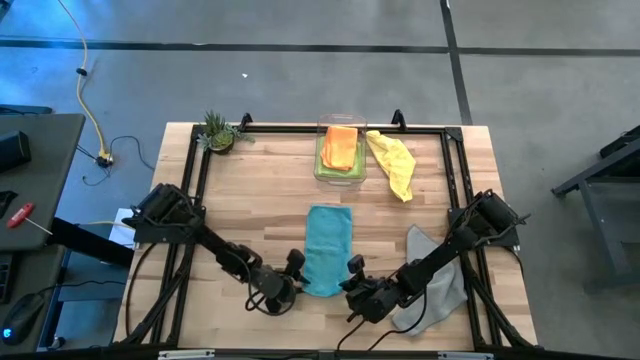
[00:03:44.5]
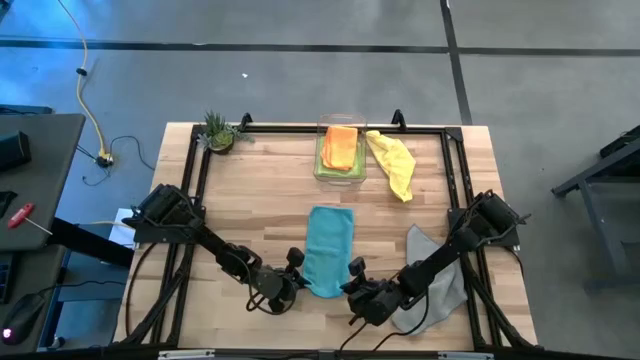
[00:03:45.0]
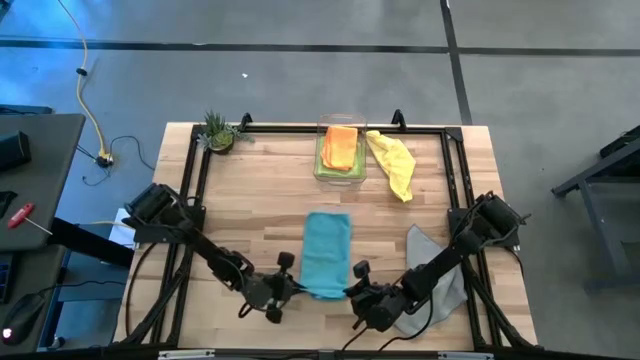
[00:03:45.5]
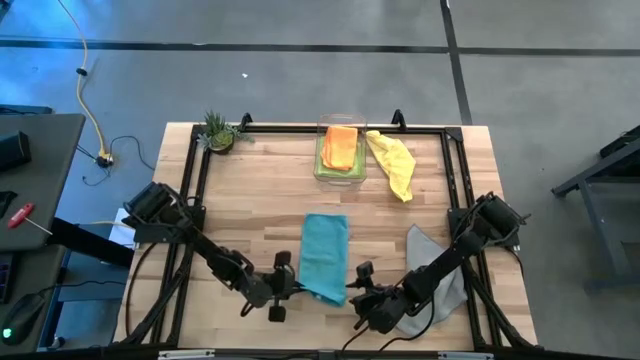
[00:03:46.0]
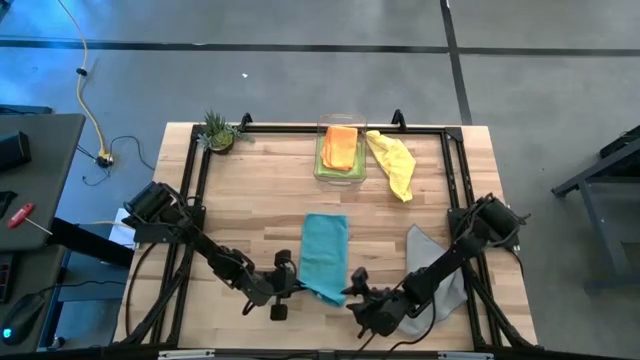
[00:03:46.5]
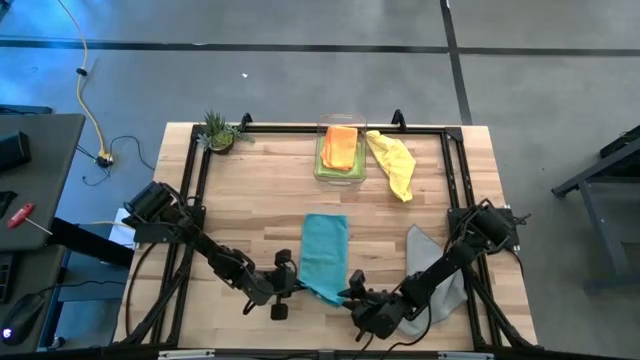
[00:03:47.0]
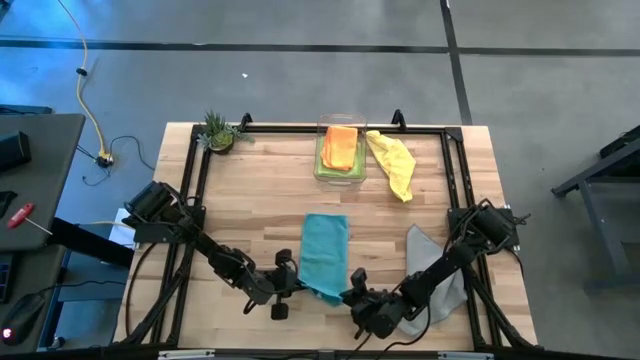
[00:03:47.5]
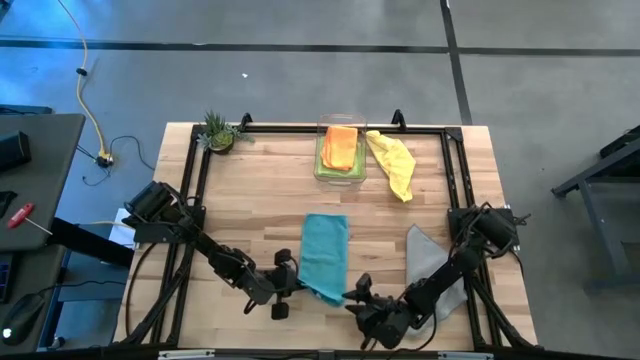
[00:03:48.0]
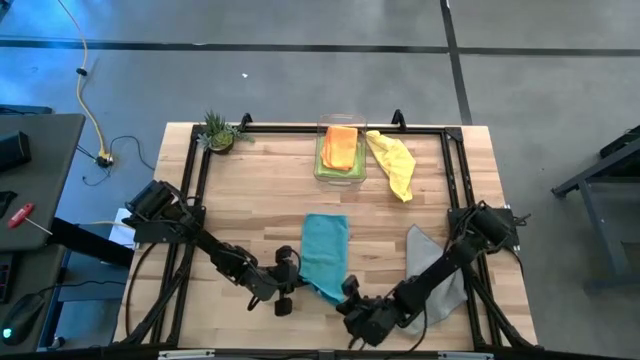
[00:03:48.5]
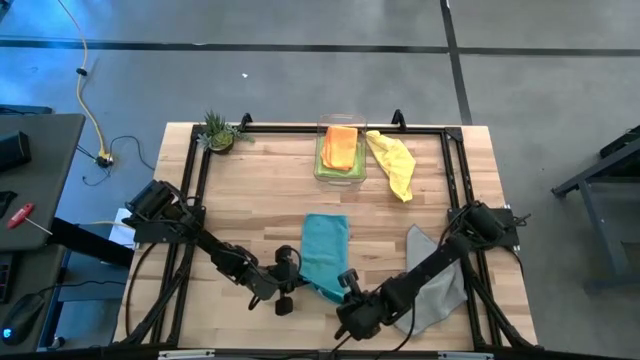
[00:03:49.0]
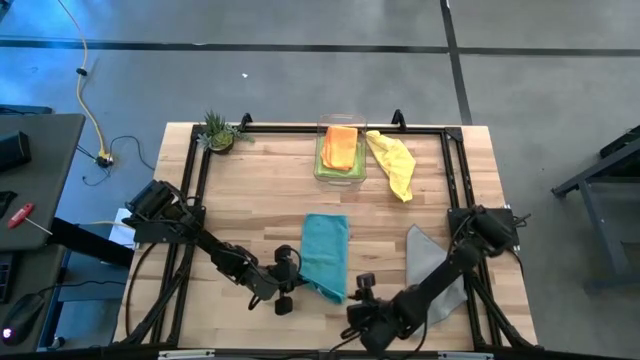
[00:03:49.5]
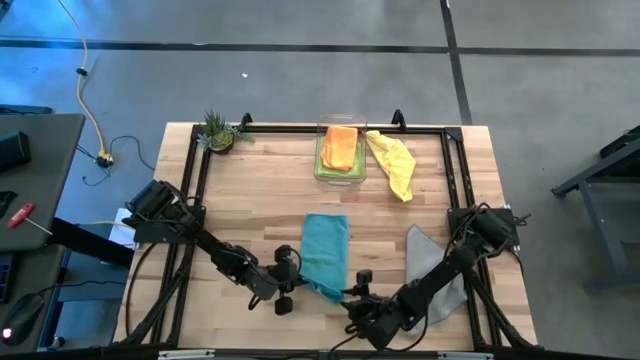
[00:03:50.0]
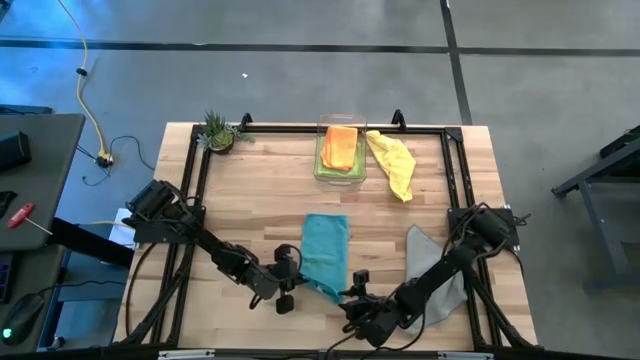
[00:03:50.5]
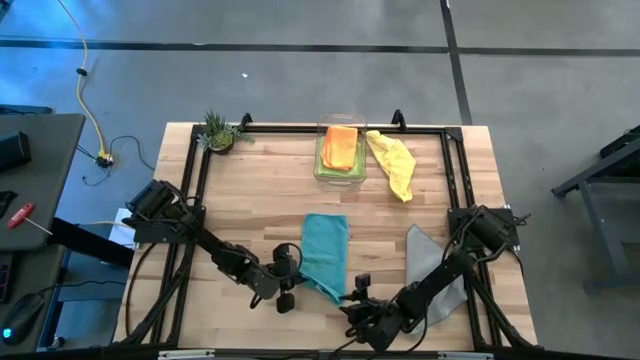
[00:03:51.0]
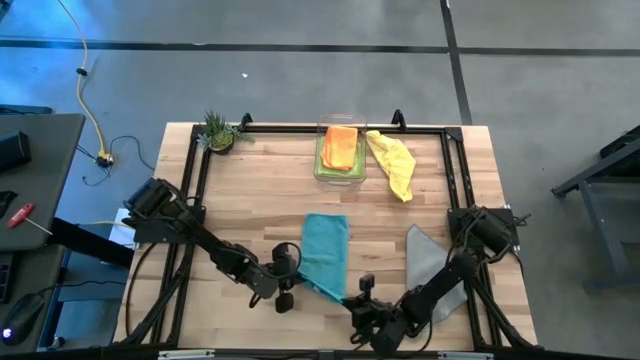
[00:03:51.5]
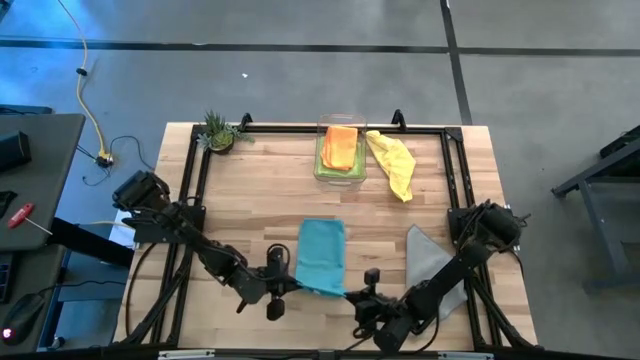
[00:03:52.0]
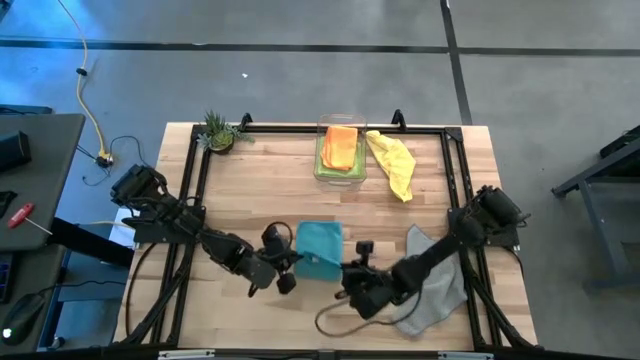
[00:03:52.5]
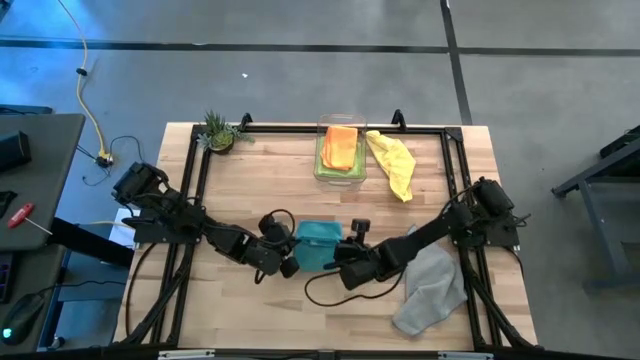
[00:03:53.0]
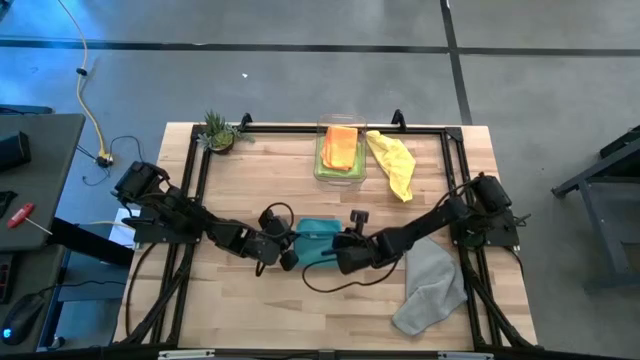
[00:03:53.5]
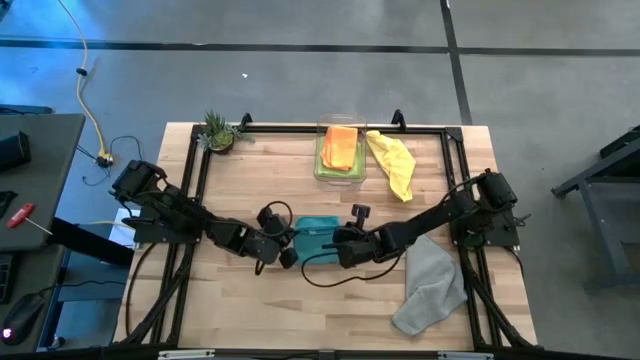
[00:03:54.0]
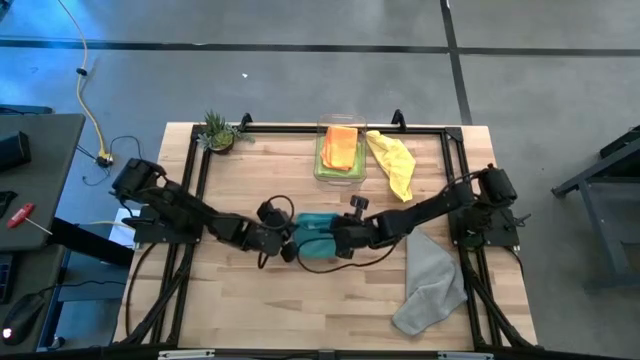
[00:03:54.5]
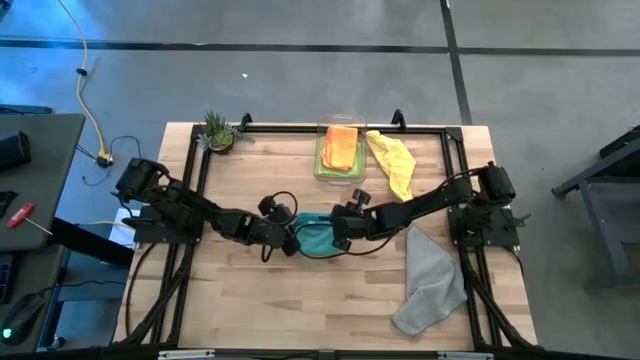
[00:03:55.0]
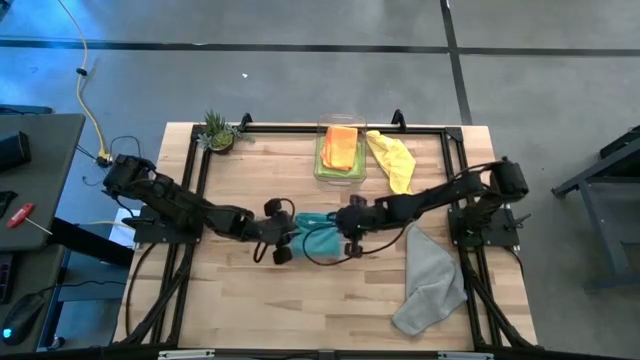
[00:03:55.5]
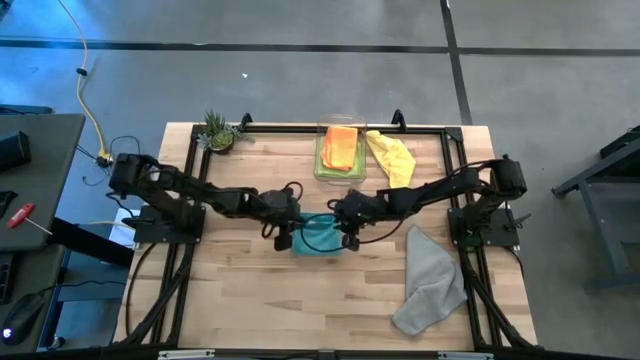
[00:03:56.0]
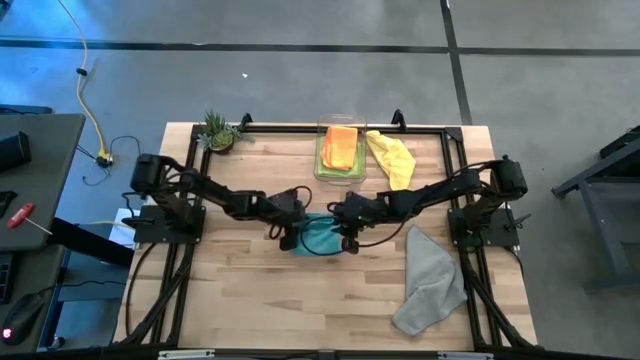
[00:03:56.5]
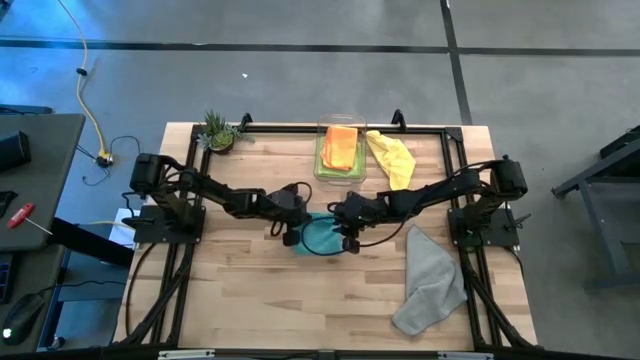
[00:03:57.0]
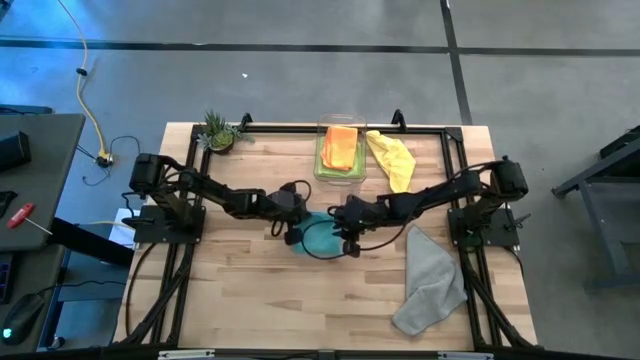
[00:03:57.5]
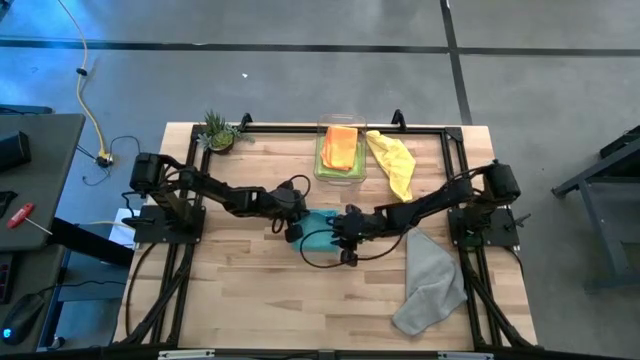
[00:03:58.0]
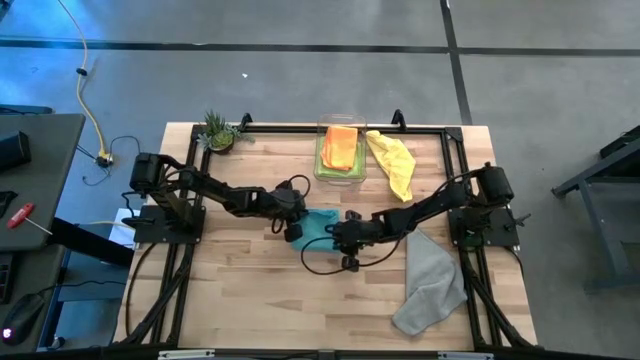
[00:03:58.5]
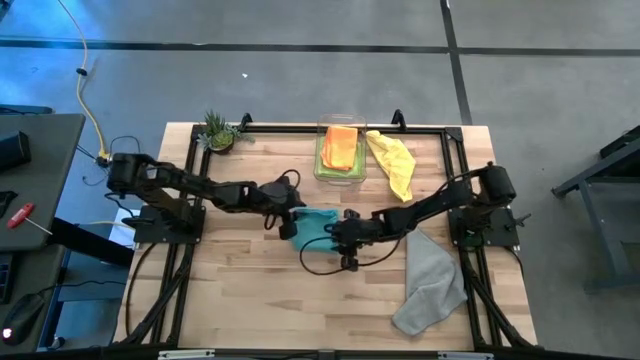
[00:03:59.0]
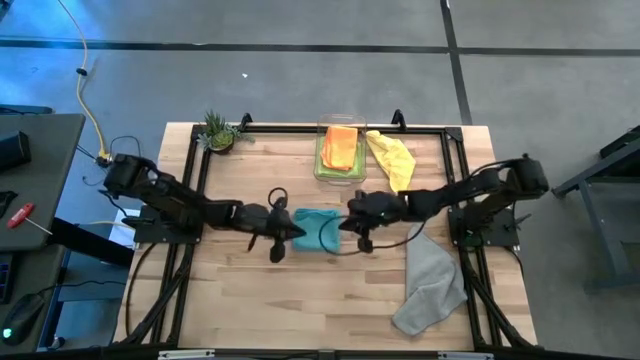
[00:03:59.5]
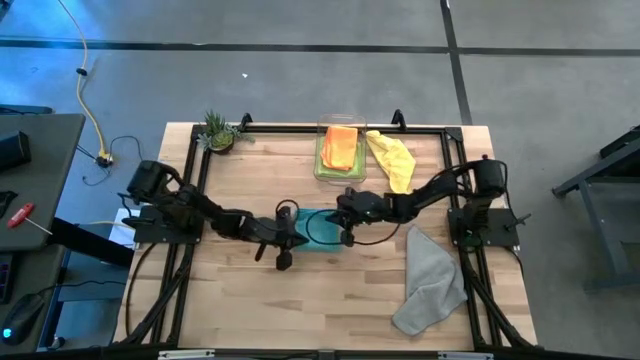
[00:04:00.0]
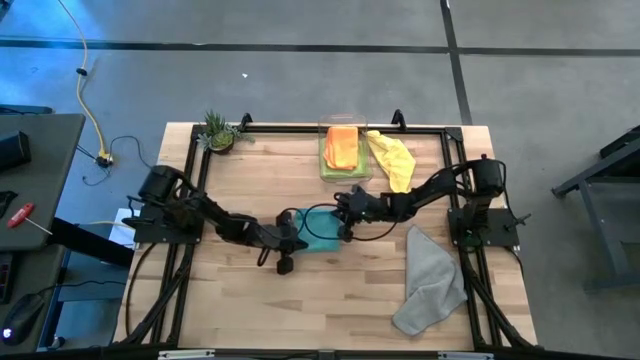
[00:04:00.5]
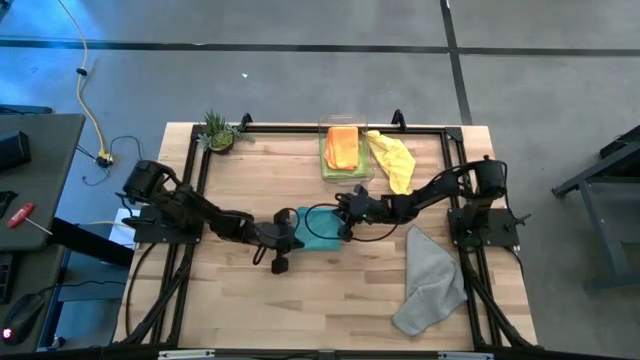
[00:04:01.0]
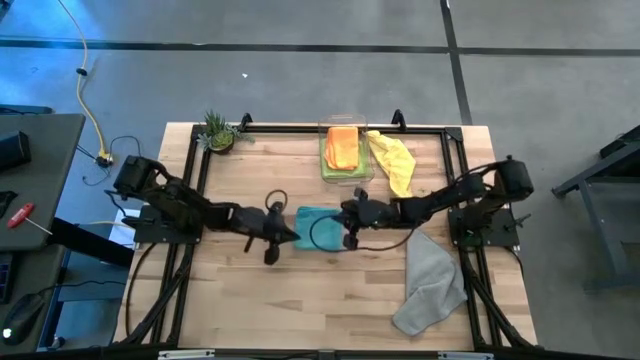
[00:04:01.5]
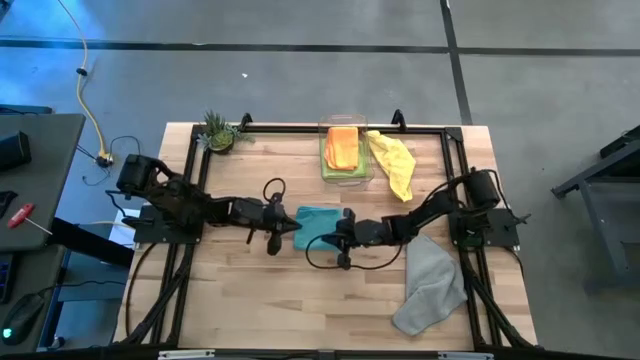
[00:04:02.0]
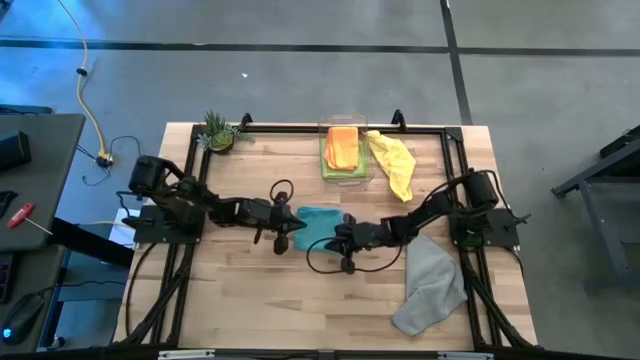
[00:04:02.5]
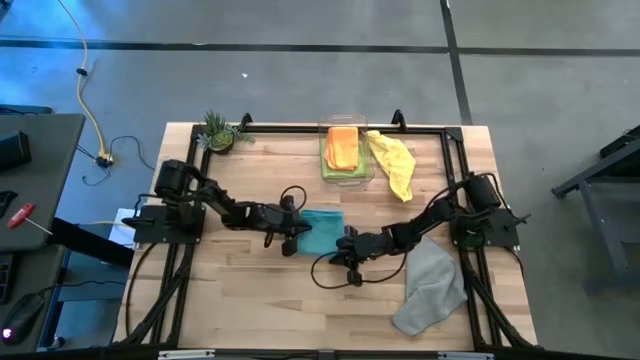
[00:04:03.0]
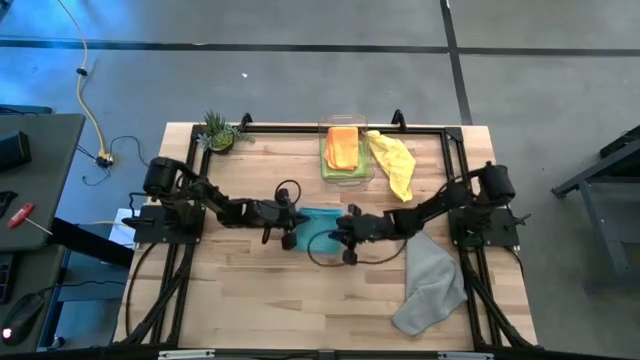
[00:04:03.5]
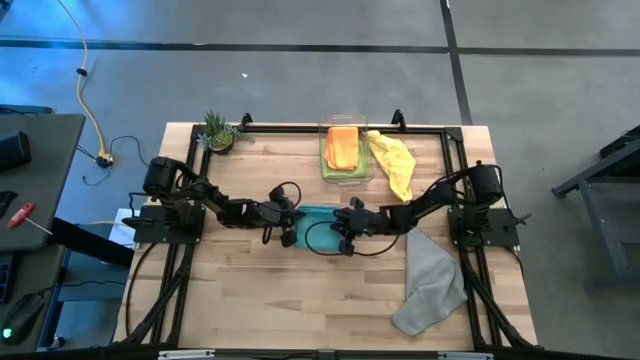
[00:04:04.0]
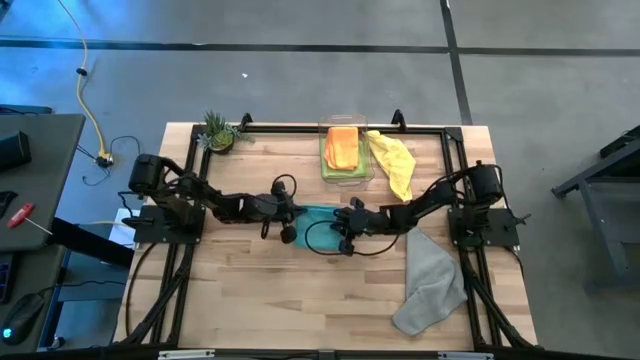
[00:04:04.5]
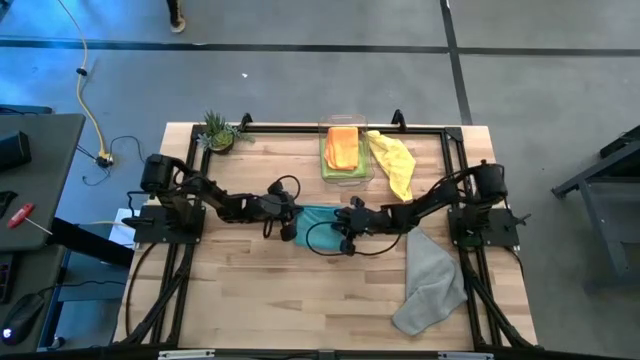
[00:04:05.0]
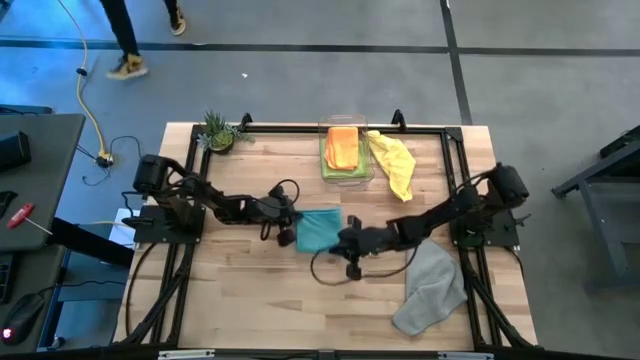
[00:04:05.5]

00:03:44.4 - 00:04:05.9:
Task: Fold microfiber towels
Fold the blue microfiber cloth
